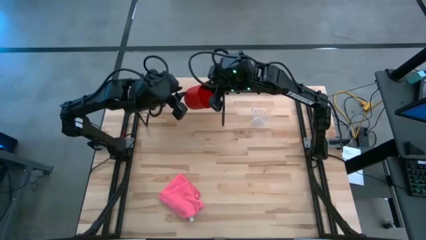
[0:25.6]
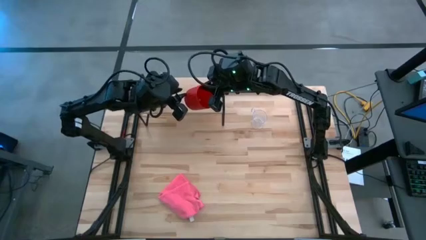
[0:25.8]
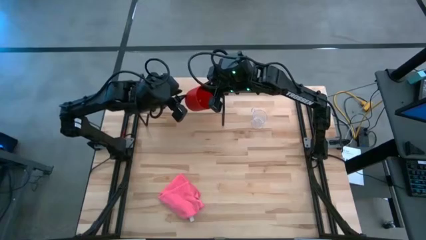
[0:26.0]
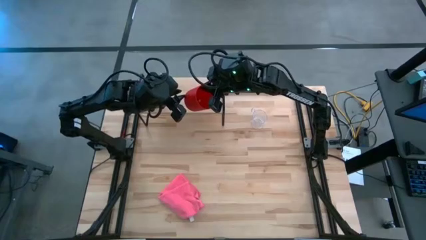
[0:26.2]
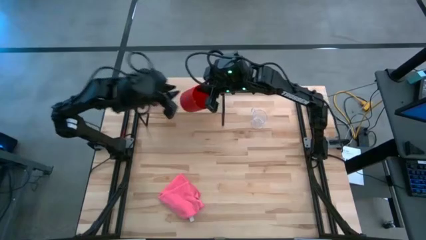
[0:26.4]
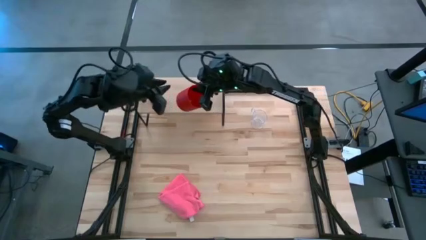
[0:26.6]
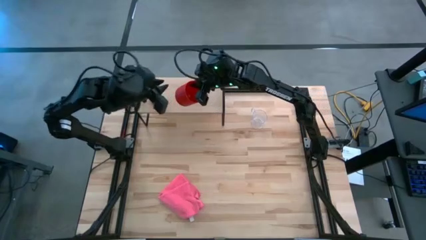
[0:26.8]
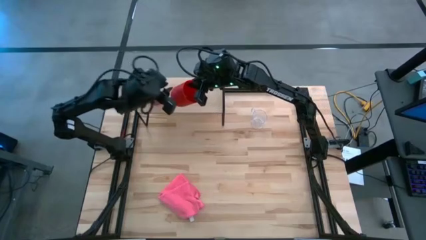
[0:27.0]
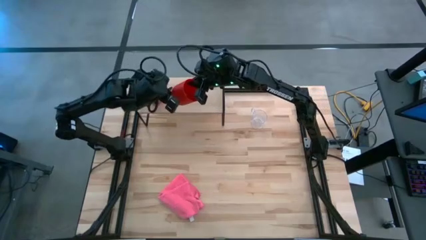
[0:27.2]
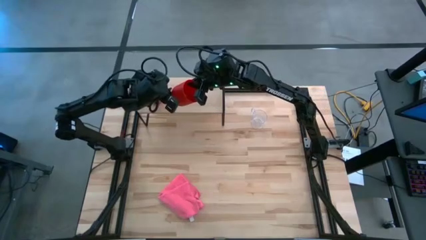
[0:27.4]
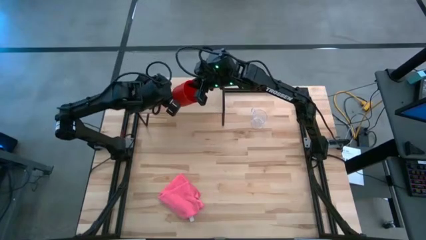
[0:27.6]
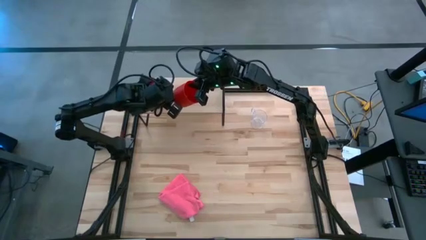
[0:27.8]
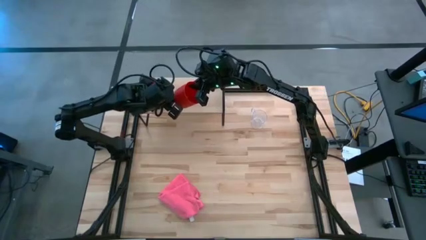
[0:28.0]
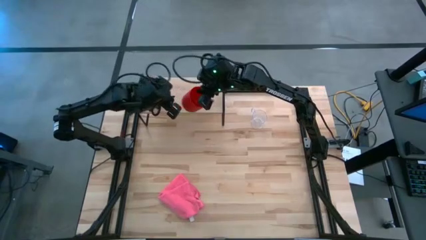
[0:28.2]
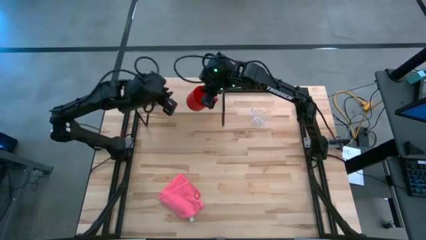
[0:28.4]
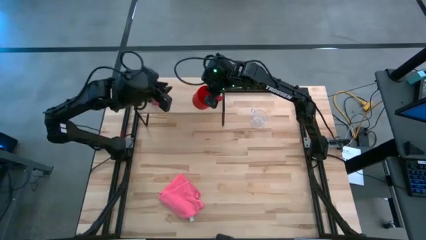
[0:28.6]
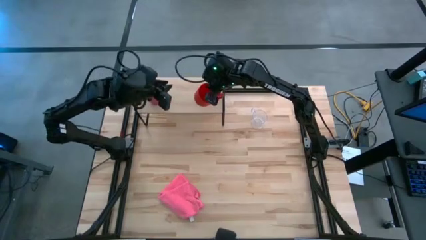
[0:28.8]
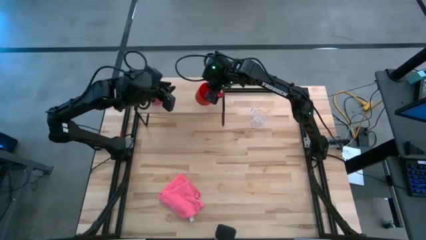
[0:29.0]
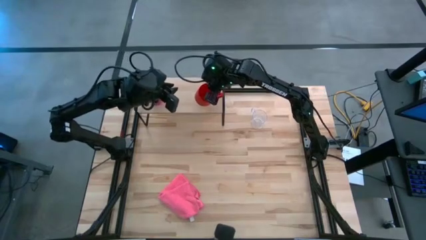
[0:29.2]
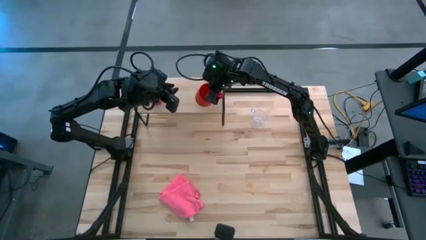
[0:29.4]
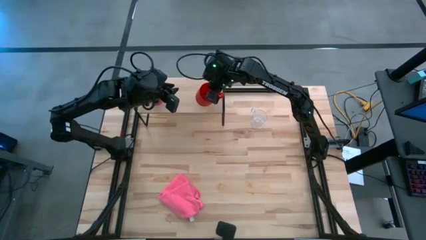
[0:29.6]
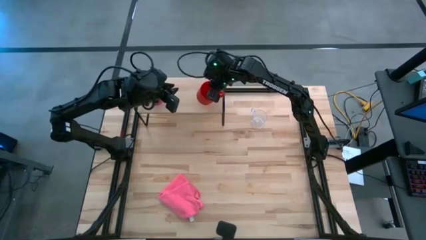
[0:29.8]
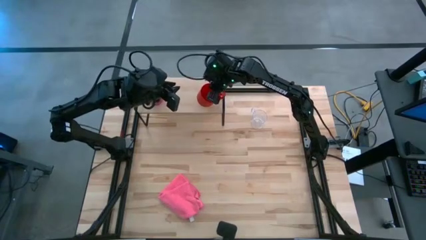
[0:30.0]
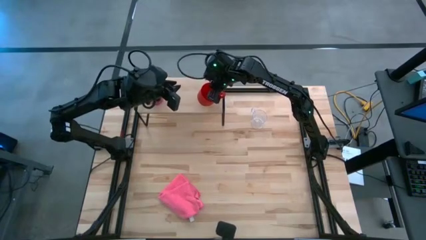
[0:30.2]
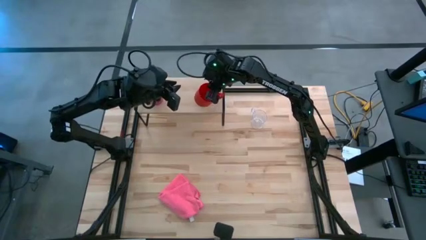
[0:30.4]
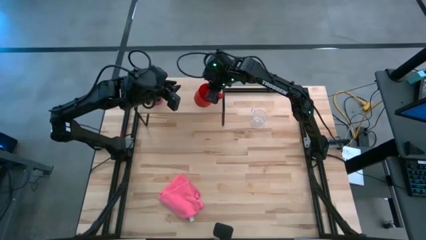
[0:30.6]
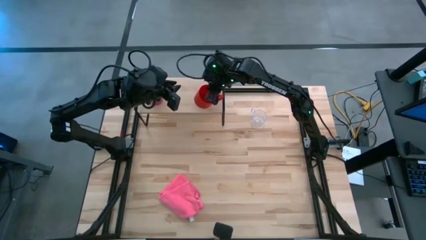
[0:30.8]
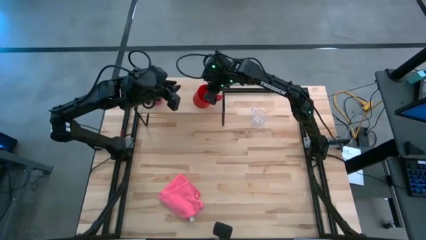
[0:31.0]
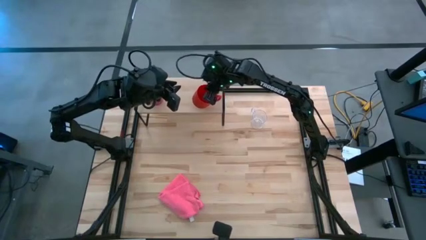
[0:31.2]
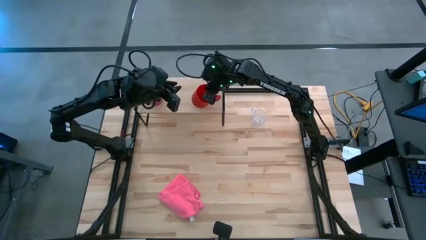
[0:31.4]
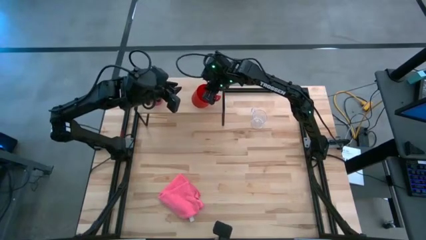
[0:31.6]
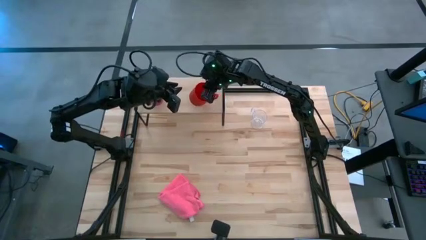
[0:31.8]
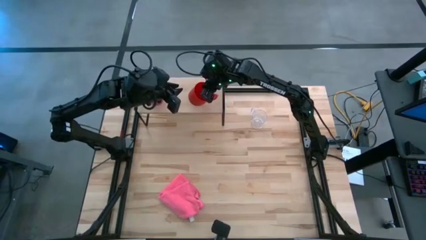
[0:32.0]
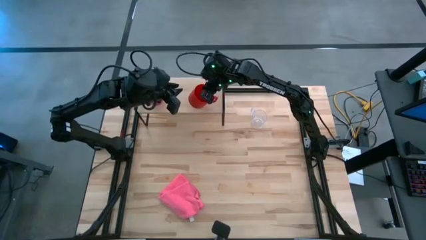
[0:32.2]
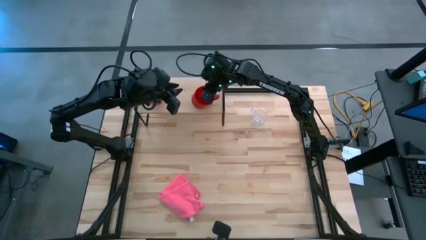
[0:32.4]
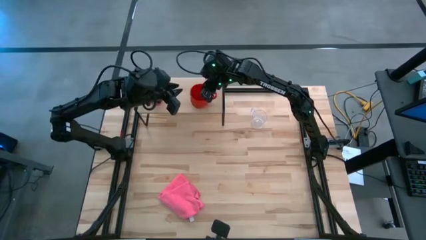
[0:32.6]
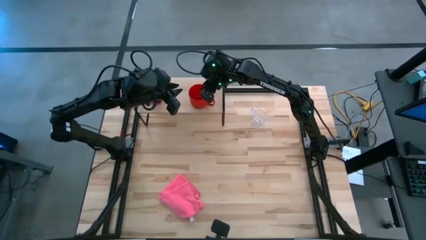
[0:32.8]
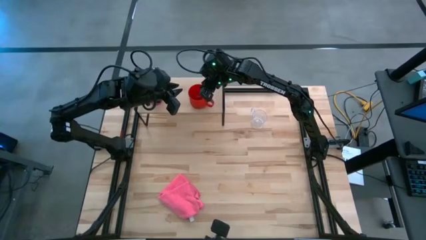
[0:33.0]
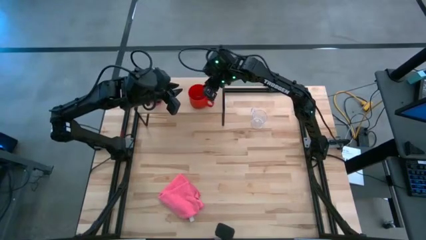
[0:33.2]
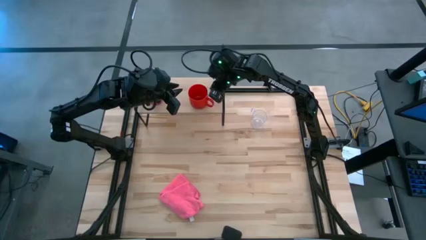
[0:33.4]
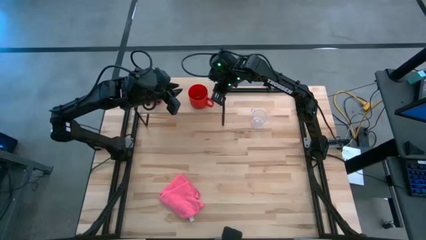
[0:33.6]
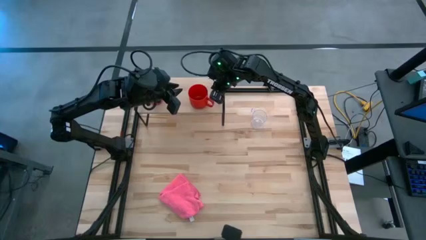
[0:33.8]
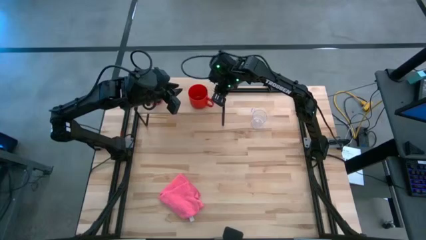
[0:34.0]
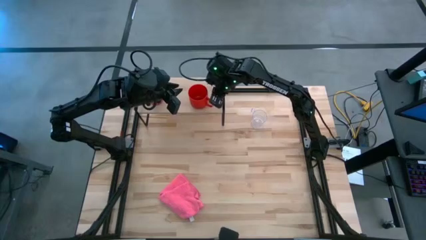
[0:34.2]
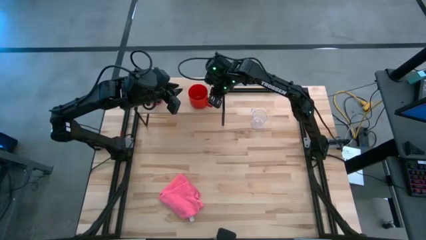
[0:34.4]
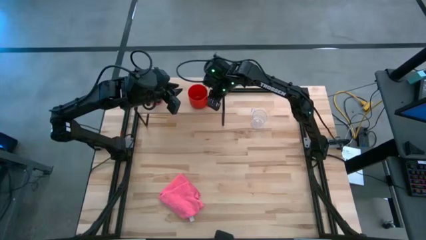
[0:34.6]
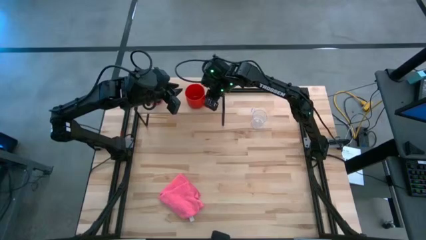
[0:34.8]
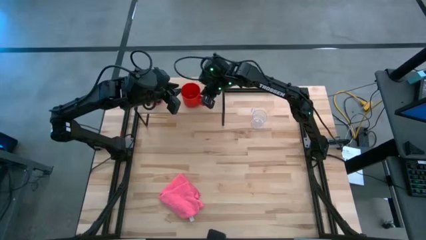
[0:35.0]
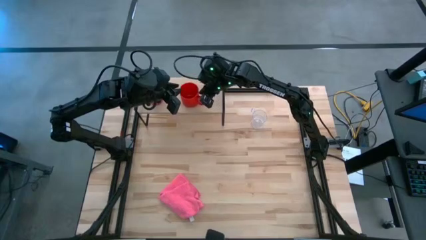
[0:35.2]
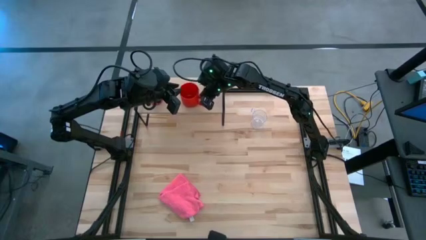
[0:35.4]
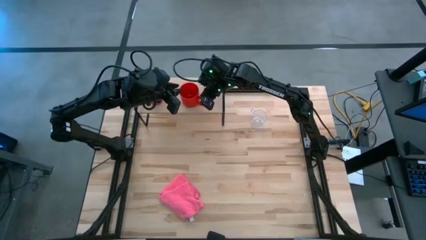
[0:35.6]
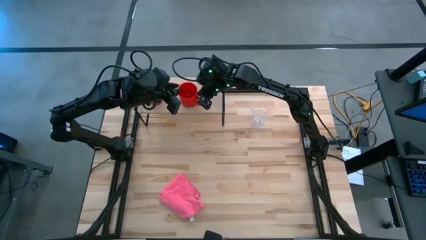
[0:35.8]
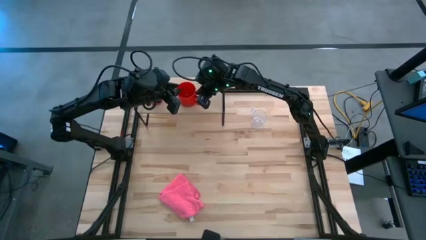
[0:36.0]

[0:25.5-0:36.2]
Task: Stack small to large cups/mugs on shelf
Put the red mug on the shelf

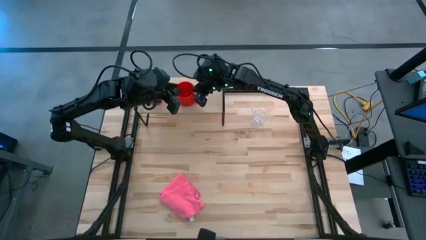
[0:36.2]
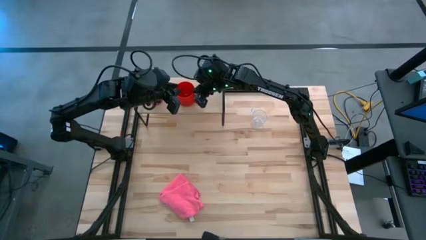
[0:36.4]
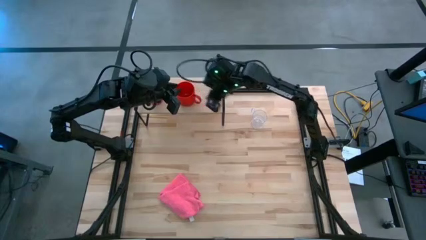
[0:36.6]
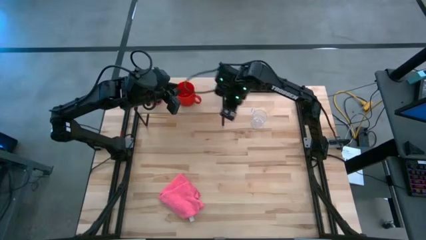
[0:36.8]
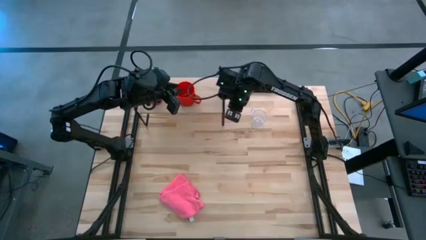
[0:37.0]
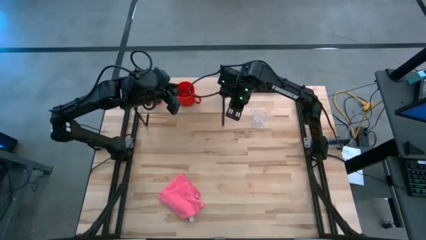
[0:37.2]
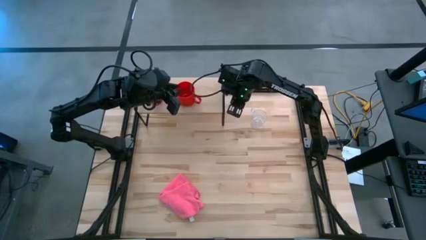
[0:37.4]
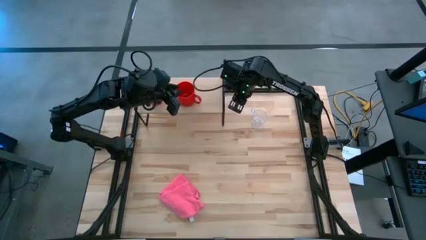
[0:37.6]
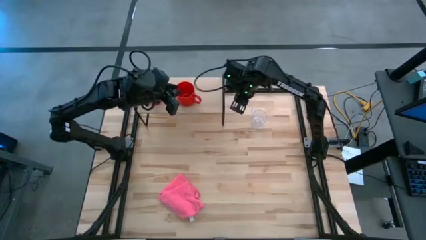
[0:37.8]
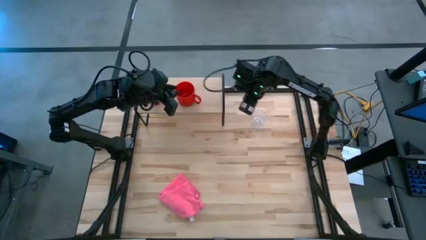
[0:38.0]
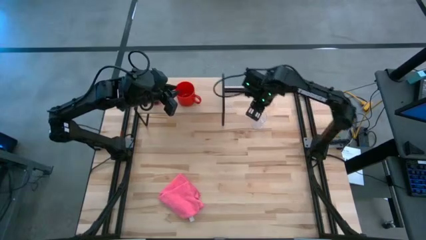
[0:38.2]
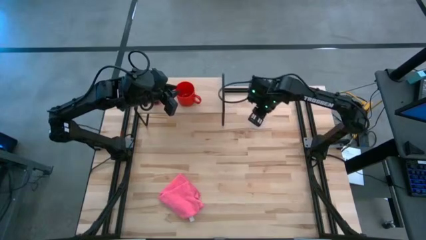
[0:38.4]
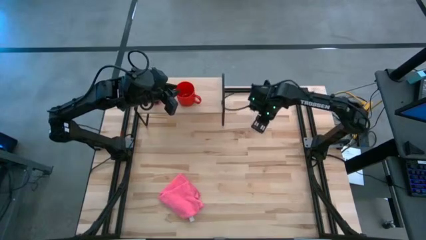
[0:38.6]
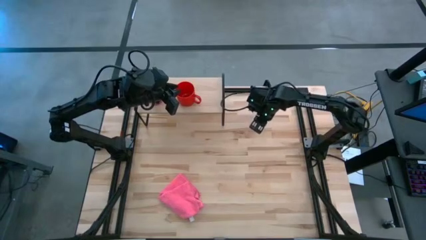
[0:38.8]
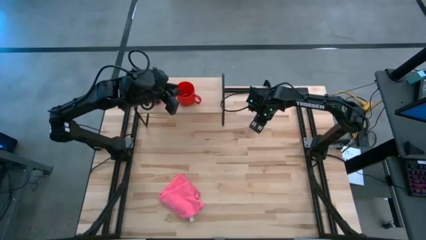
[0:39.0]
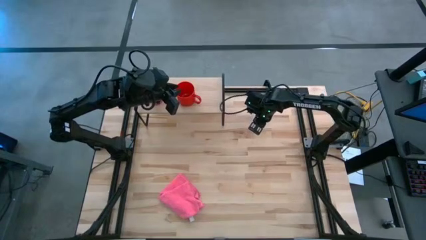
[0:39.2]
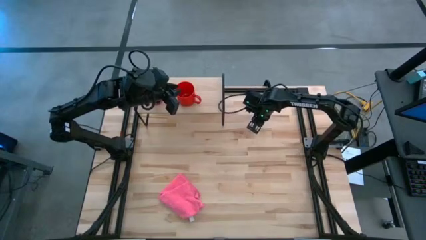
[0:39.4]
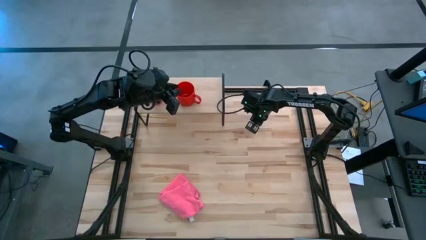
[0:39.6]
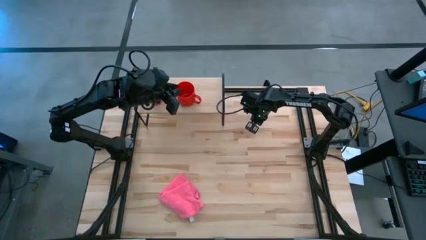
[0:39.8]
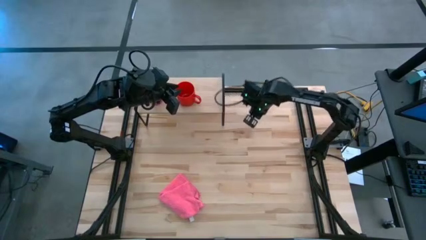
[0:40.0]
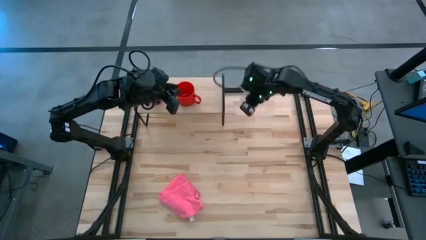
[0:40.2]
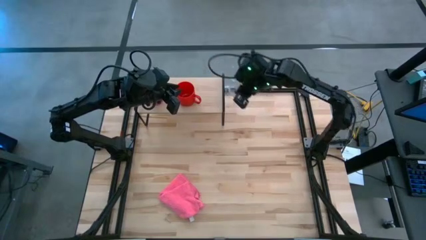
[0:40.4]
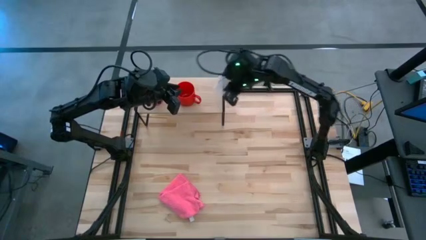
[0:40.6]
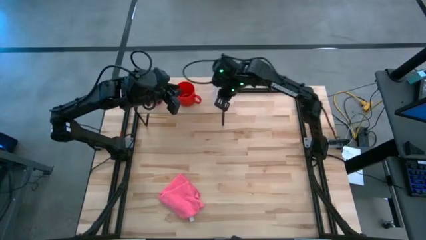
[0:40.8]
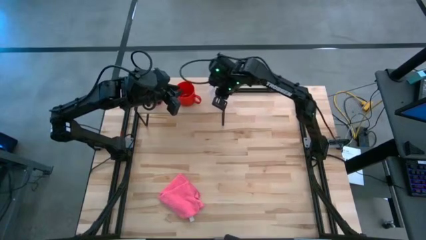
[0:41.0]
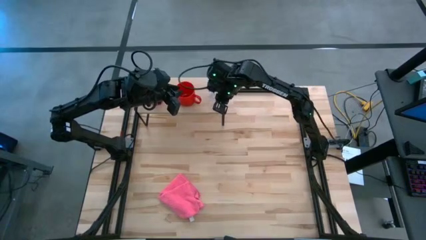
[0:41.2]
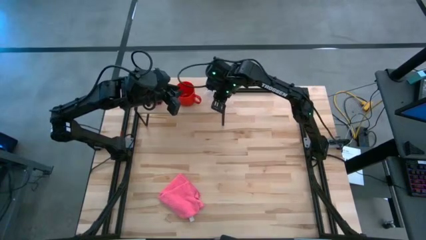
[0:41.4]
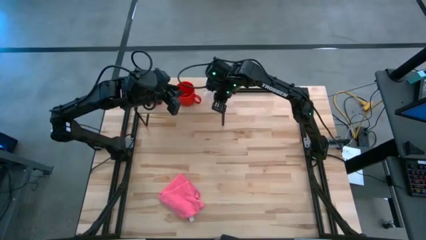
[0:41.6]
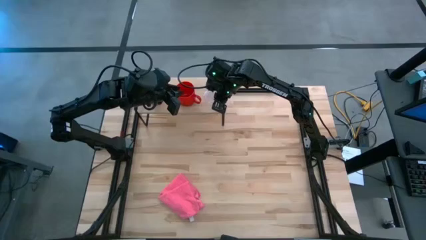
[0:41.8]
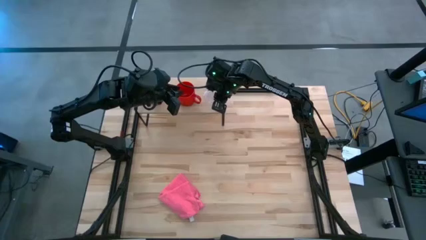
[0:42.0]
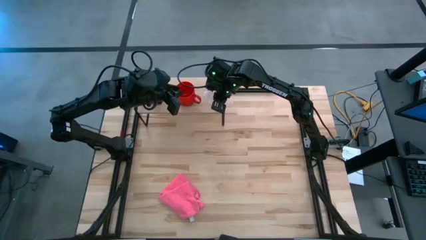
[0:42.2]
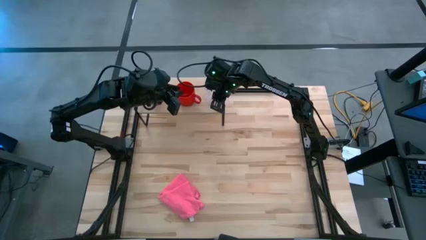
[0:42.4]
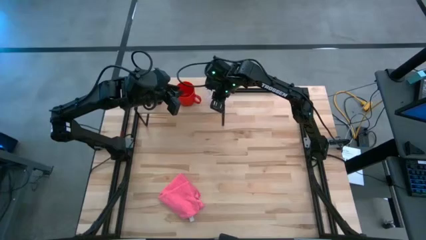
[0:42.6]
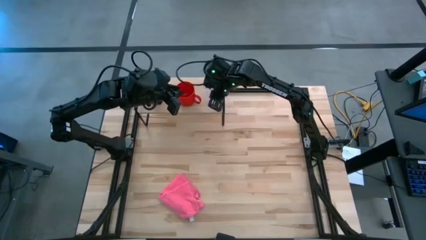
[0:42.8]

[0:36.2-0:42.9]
Put the transparent mug on the shelf
